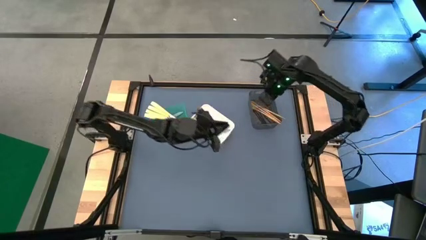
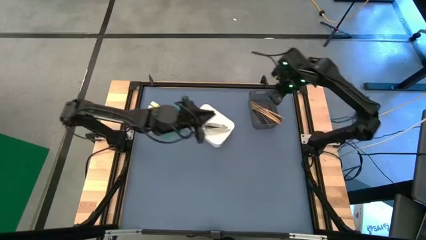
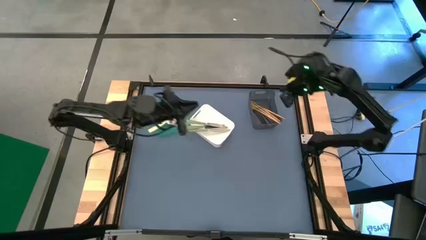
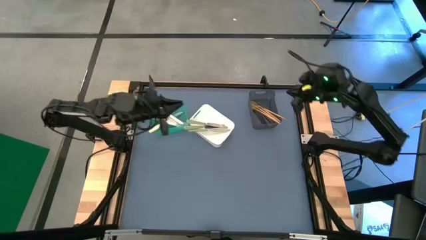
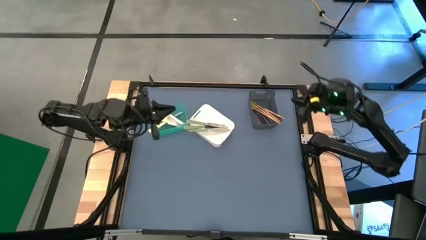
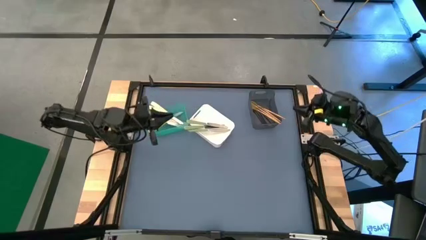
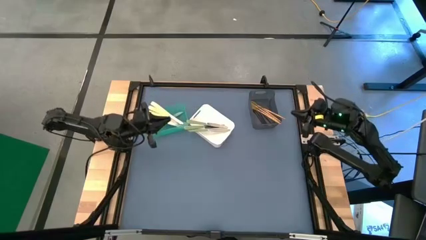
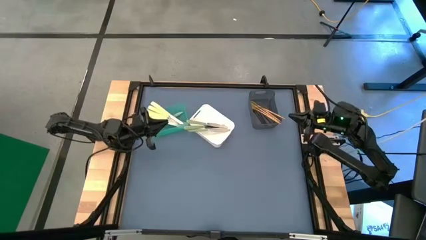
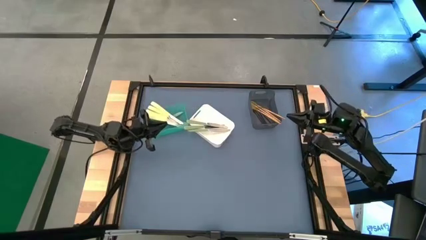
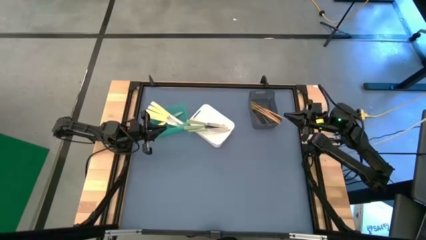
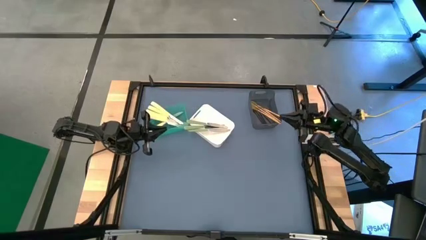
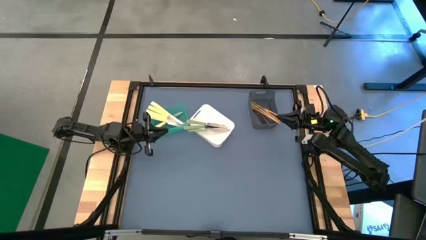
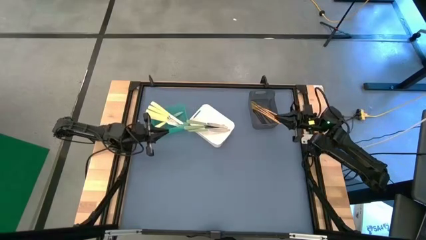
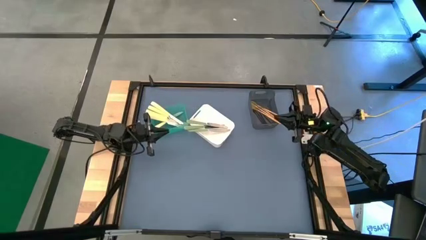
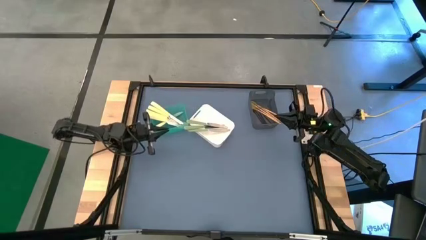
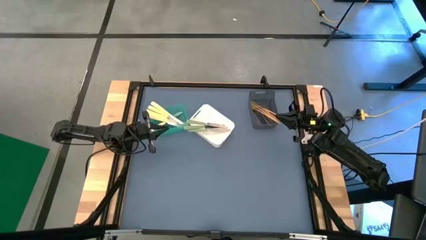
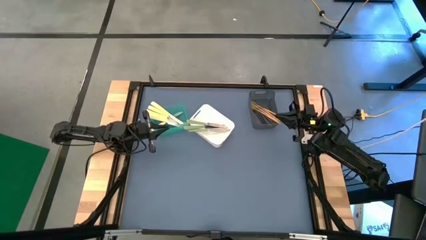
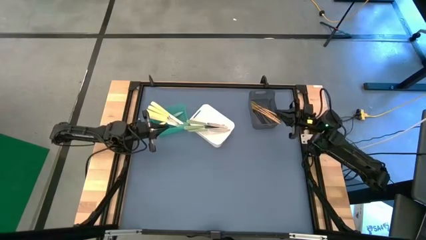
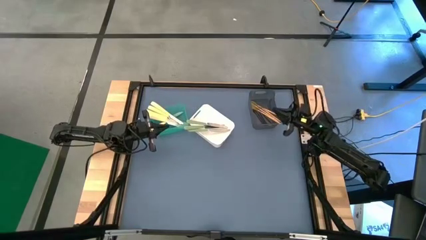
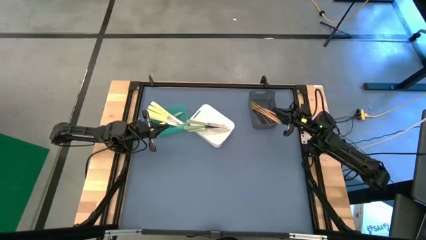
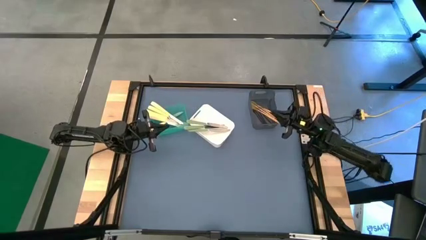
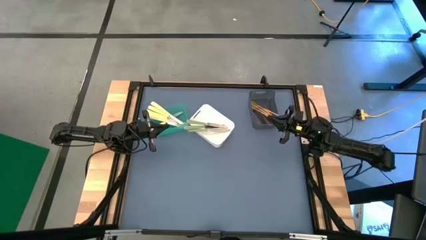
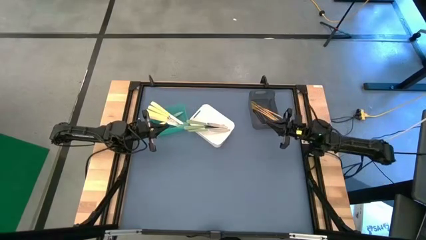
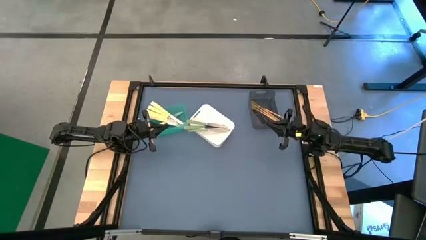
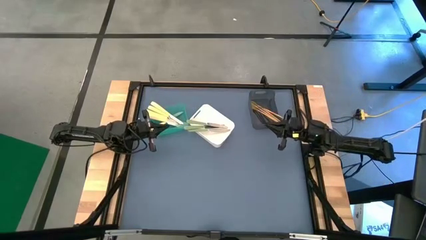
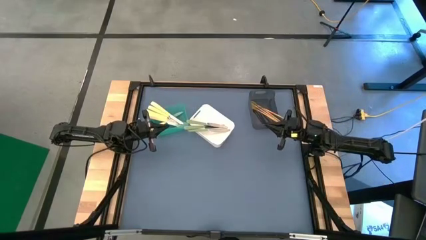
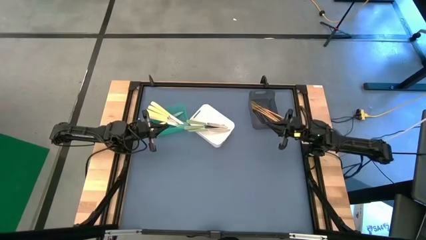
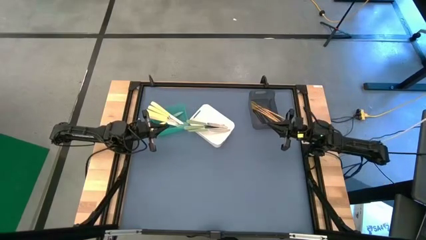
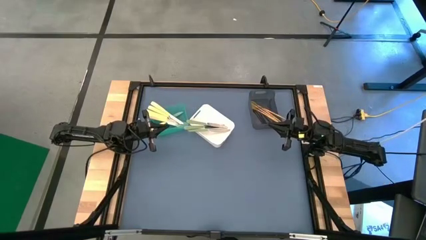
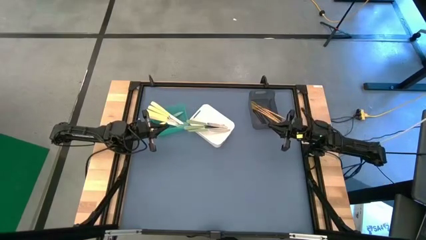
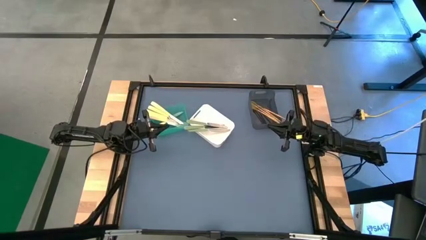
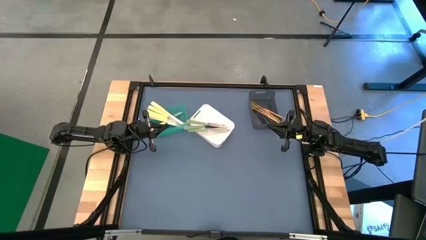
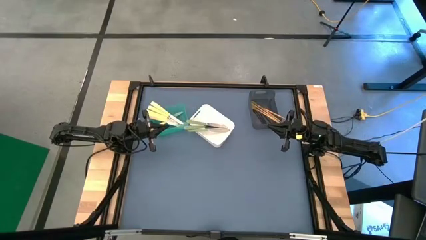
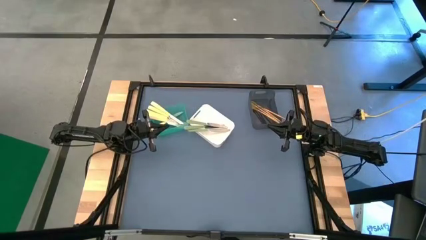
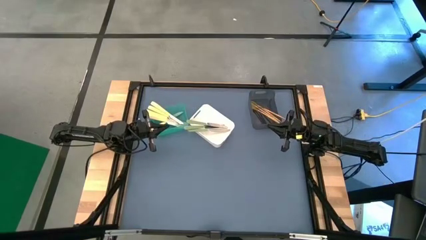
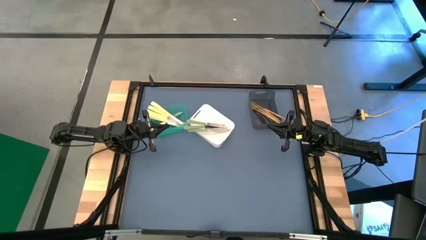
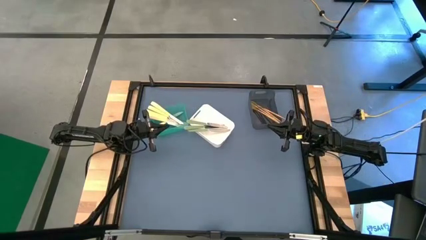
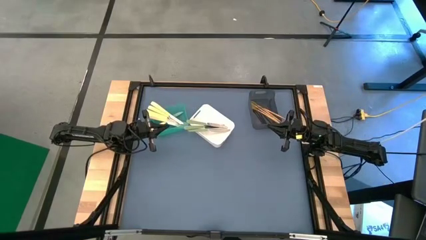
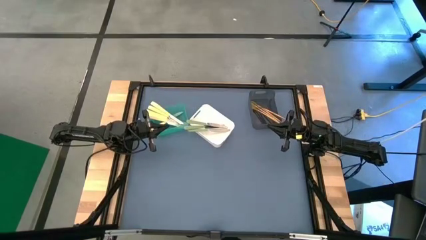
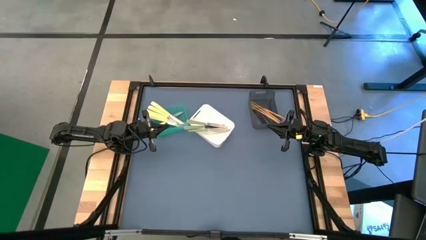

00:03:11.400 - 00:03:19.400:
Task: Sort silverware by color (type)
Return to Home Position
